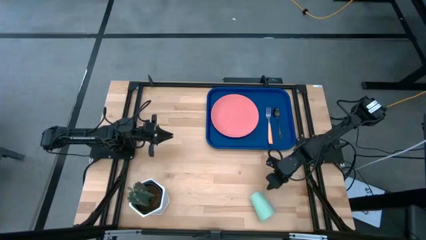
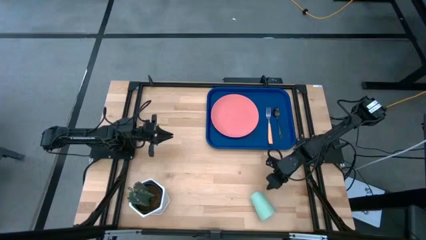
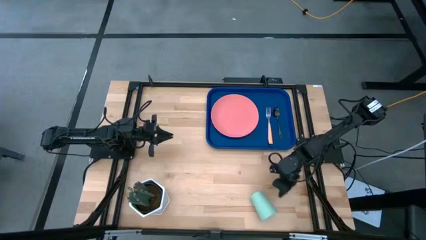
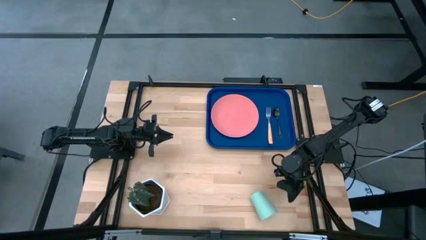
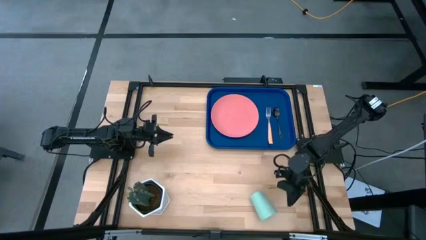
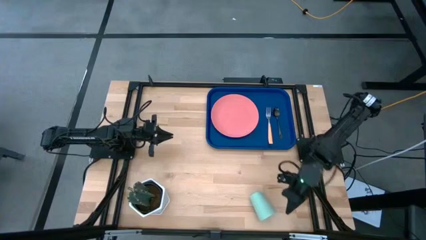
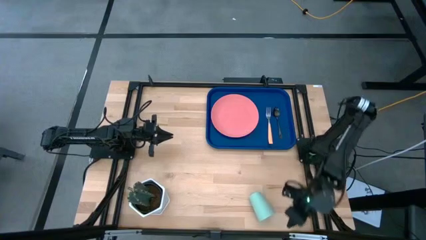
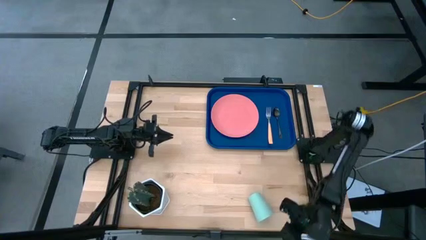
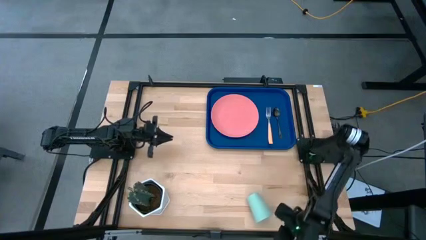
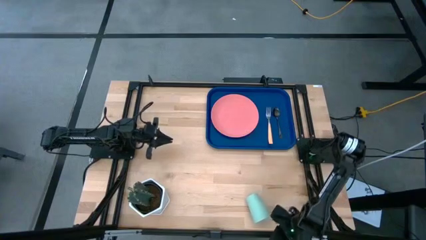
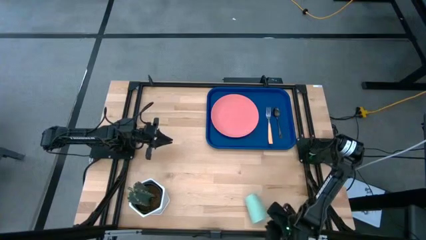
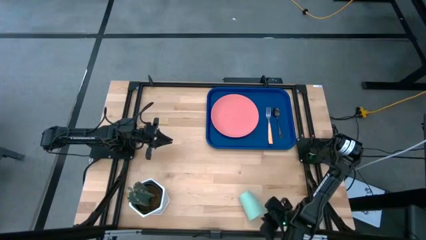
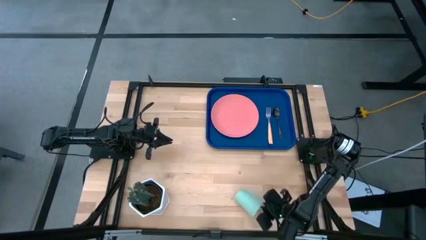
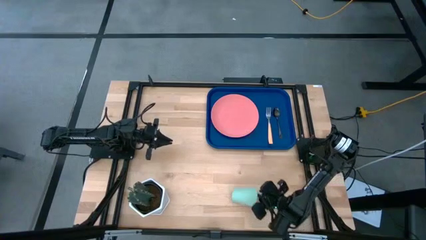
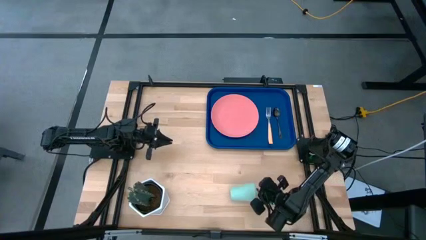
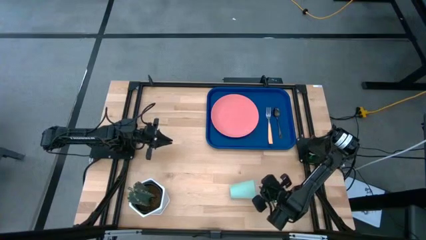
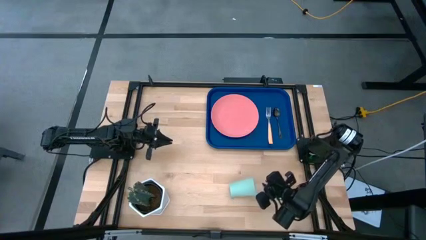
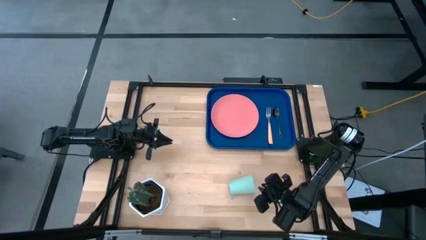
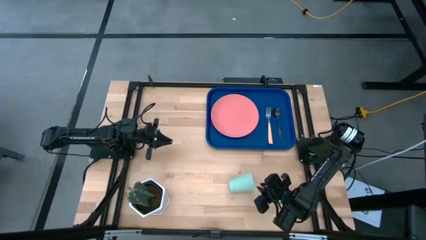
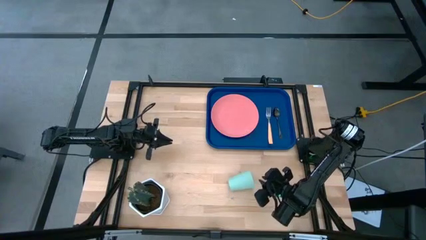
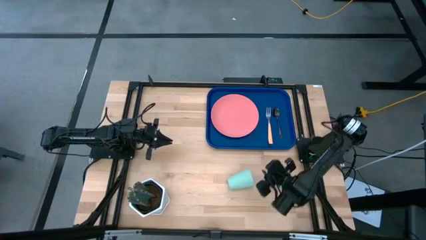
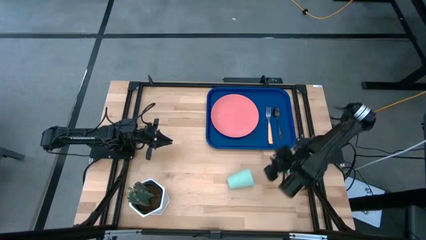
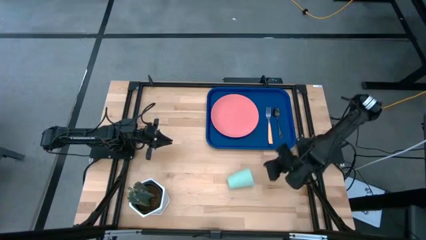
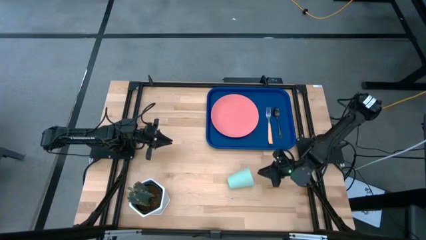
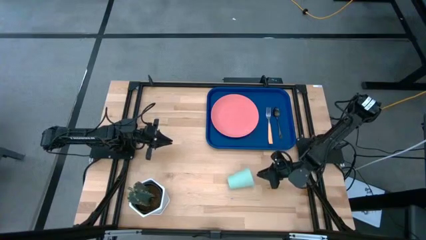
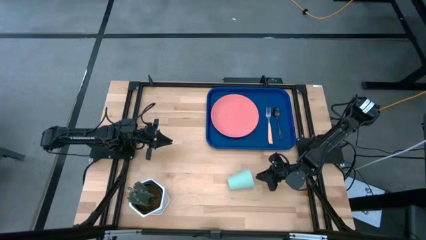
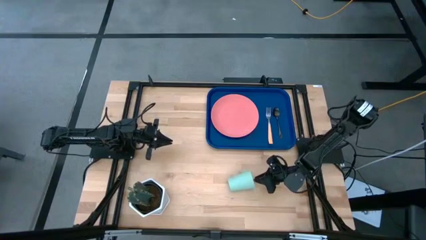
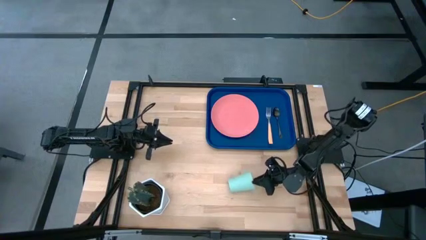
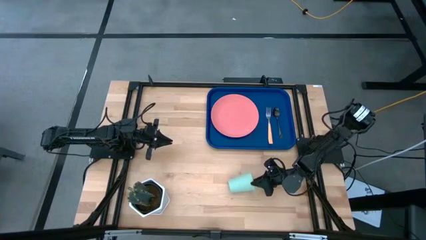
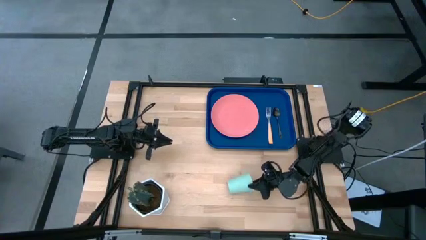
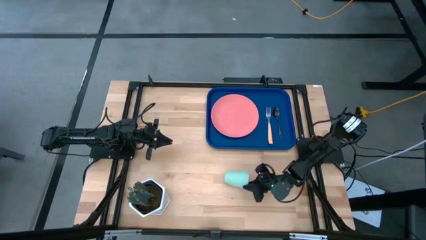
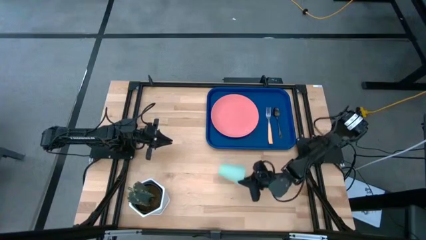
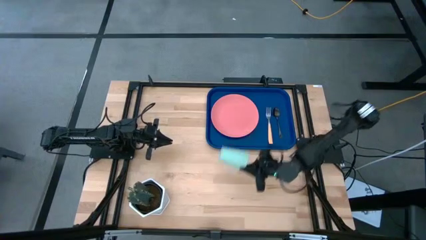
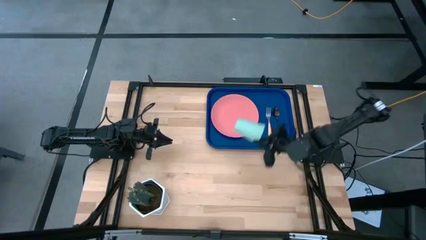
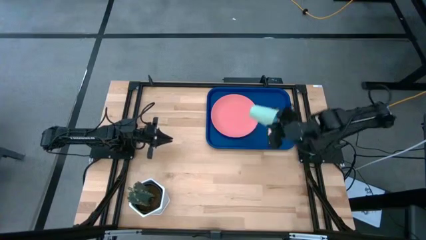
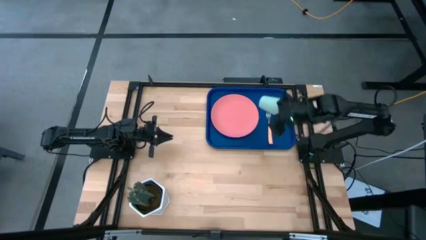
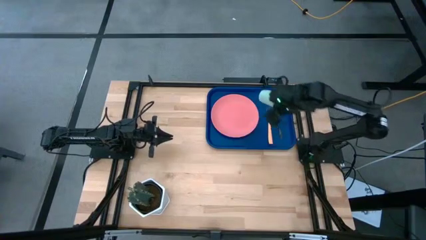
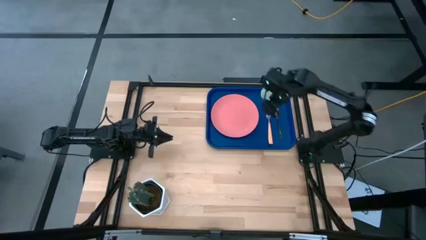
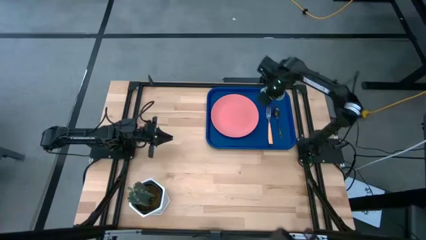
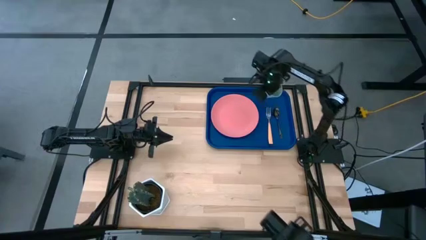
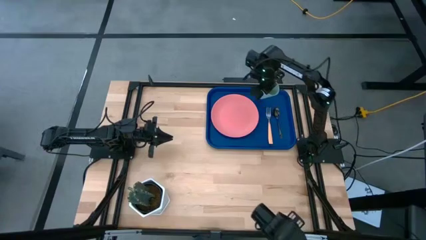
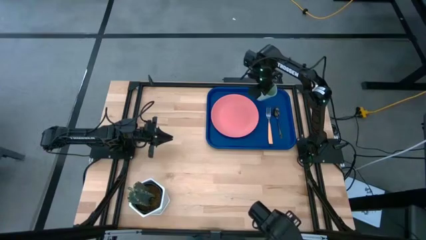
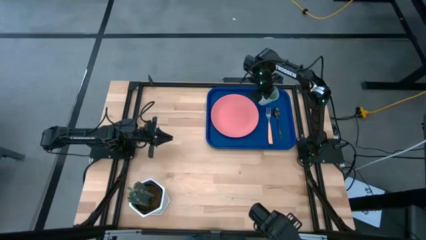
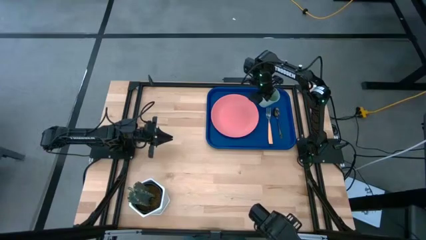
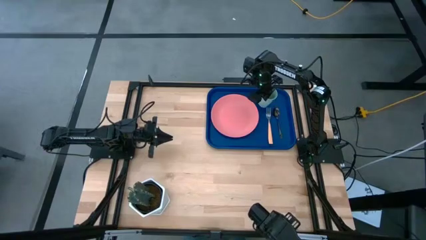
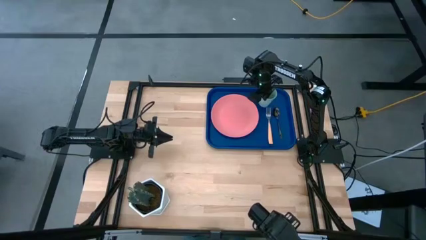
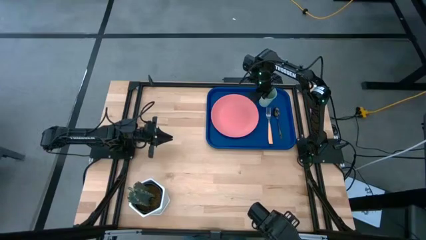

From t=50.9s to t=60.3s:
Task: Pick and place plate/cup/fork/spoon on tray
Put the green cup on the dark blue tray to the top right of the pink plate

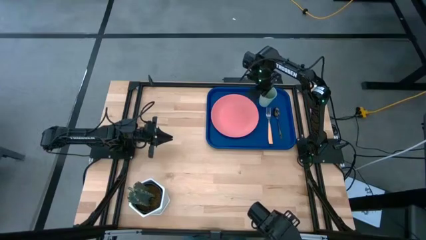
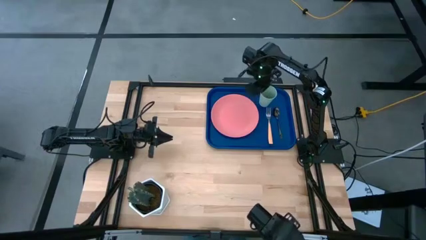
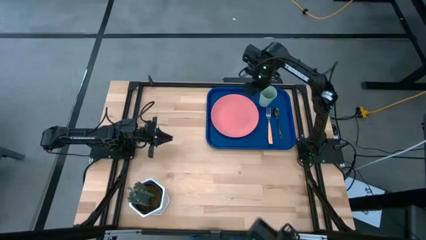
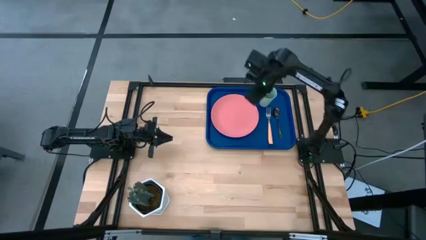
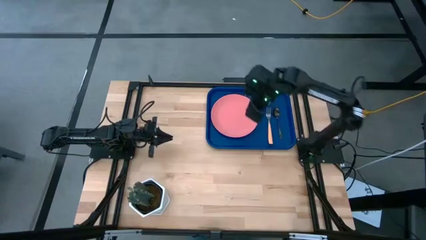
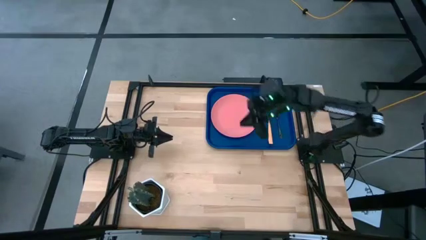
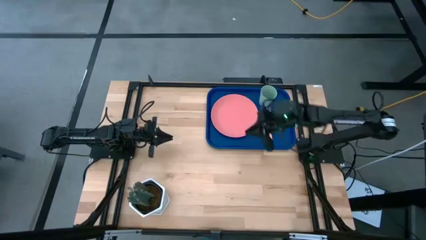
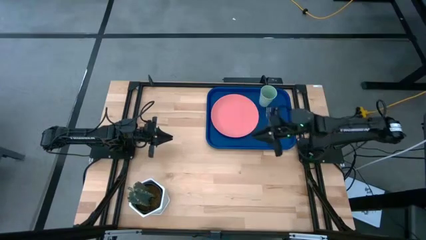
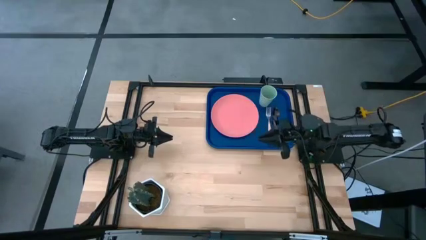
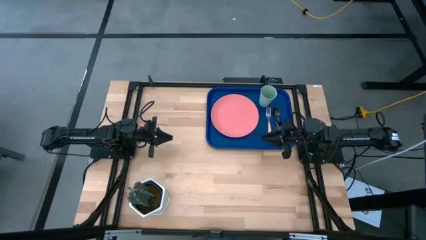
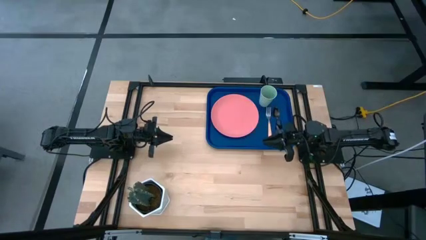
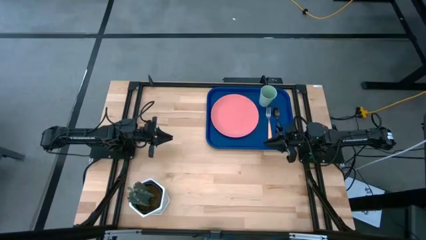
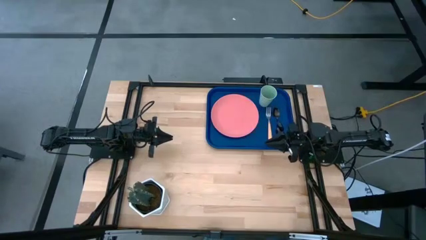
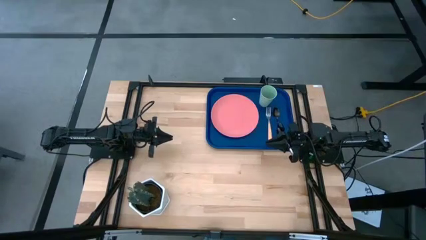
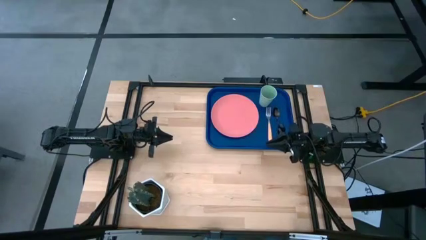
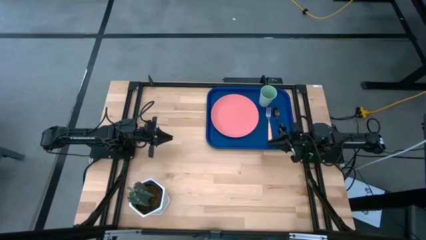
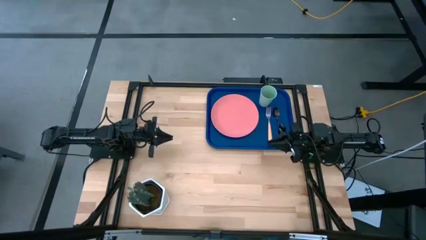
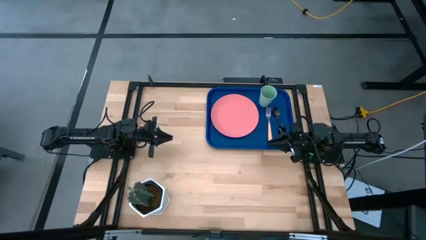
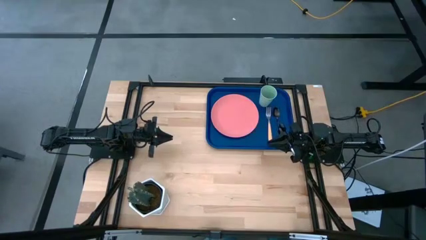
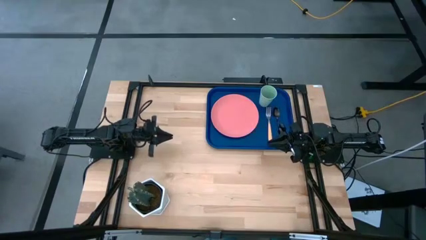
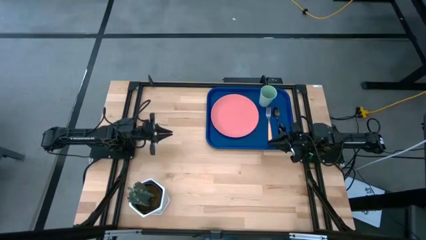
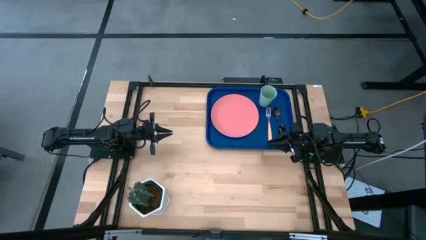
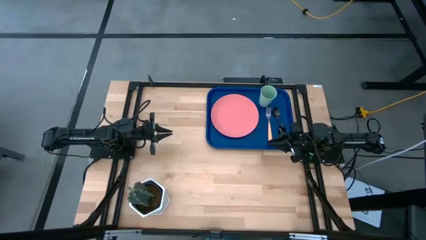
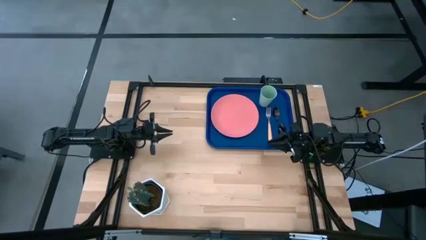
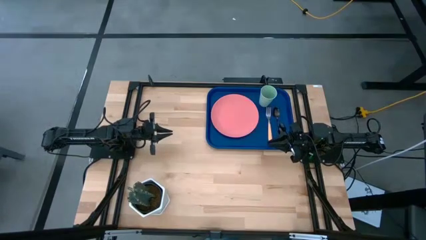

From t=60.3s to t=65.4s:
Return to Home Position
